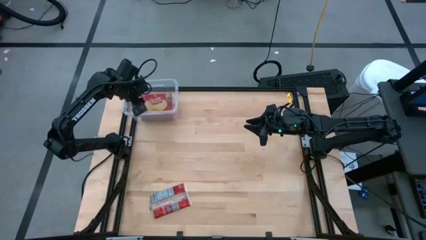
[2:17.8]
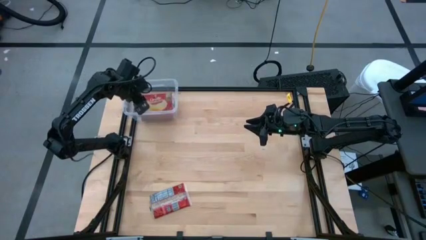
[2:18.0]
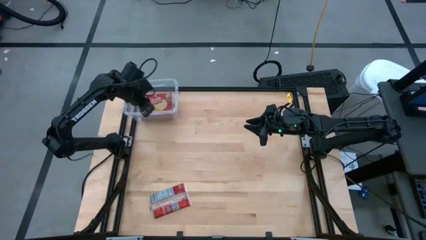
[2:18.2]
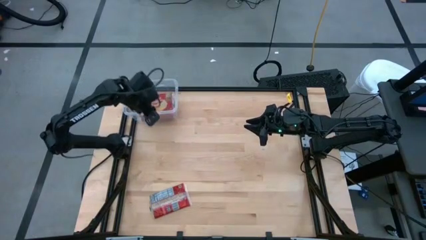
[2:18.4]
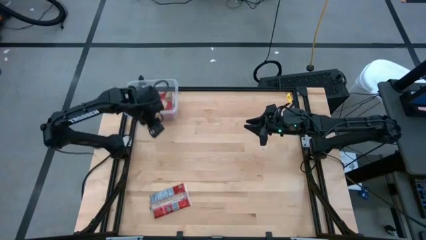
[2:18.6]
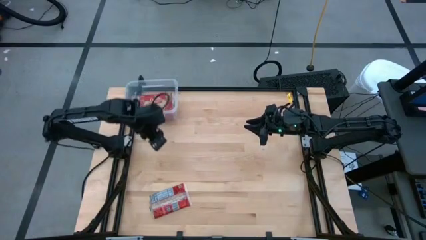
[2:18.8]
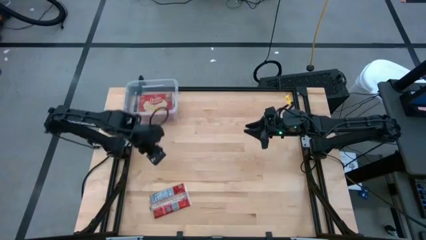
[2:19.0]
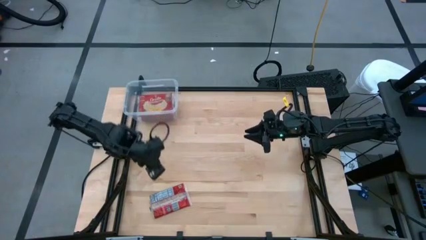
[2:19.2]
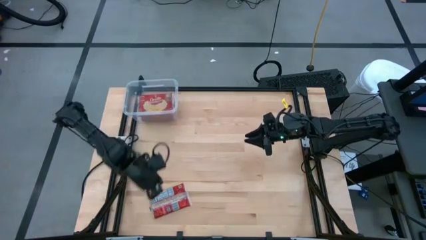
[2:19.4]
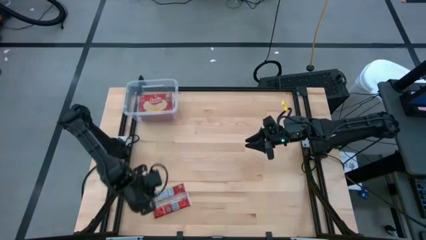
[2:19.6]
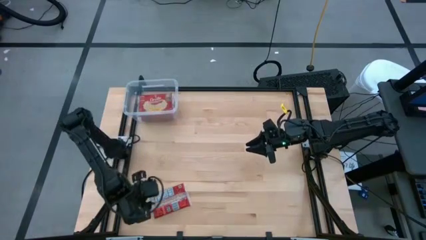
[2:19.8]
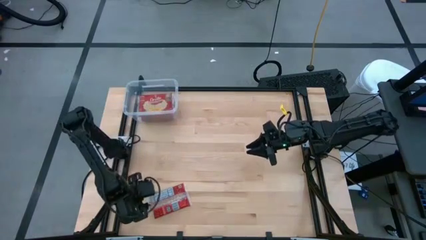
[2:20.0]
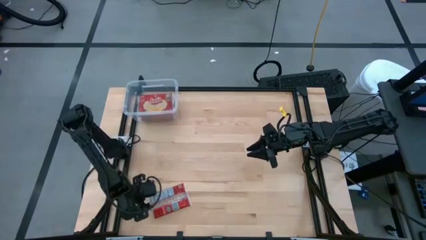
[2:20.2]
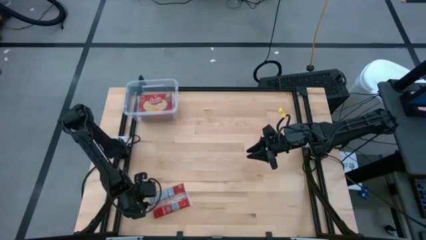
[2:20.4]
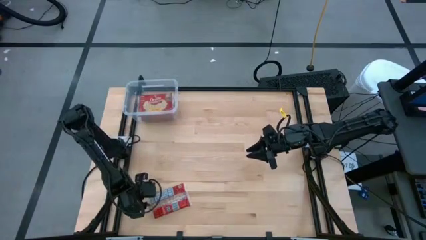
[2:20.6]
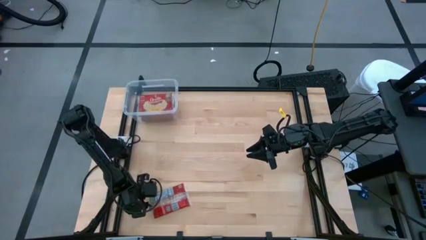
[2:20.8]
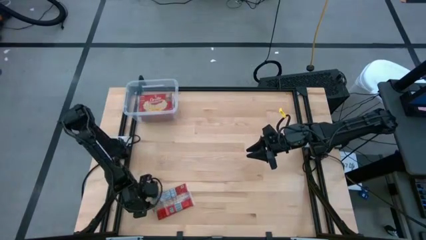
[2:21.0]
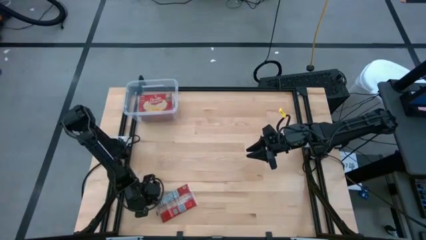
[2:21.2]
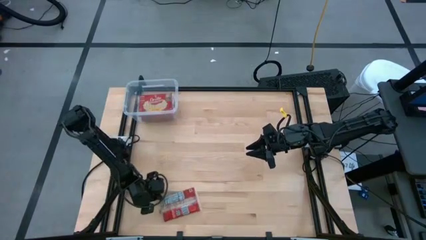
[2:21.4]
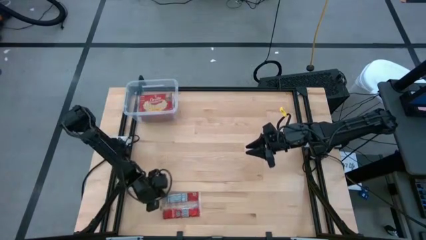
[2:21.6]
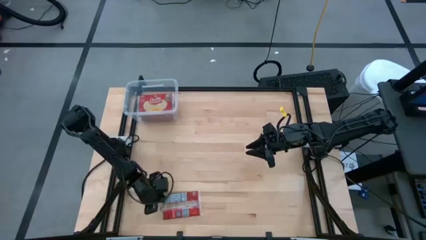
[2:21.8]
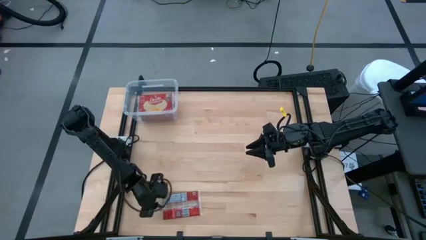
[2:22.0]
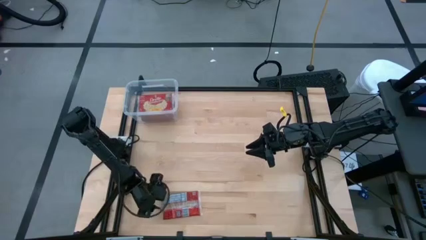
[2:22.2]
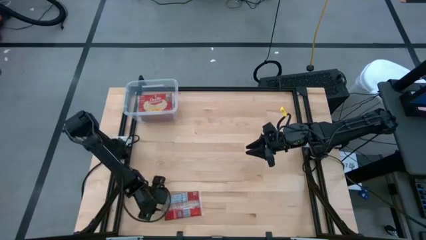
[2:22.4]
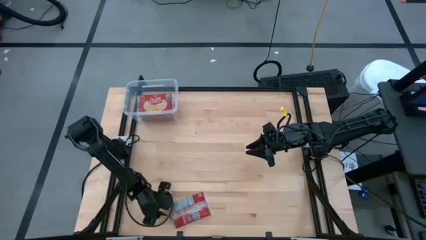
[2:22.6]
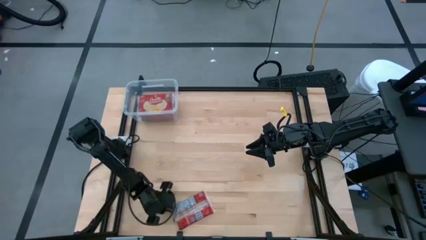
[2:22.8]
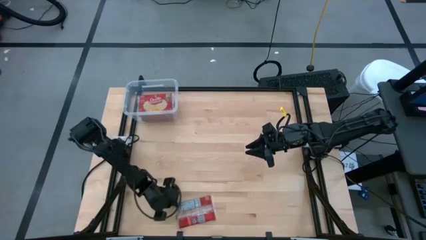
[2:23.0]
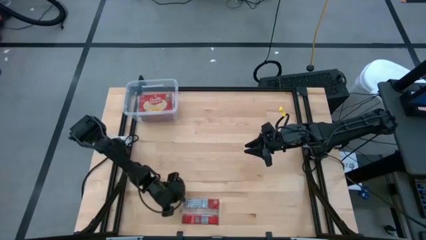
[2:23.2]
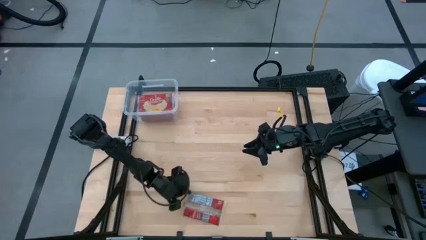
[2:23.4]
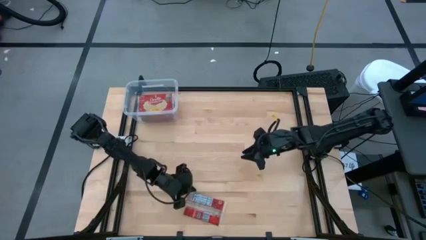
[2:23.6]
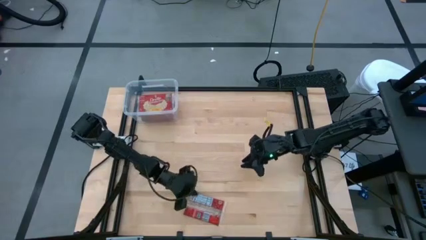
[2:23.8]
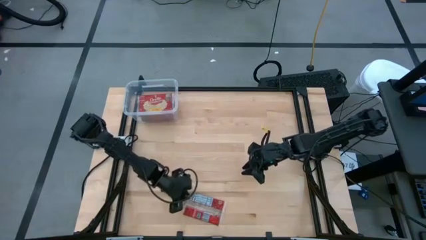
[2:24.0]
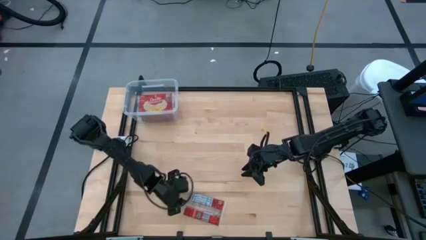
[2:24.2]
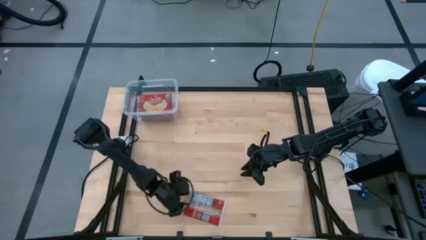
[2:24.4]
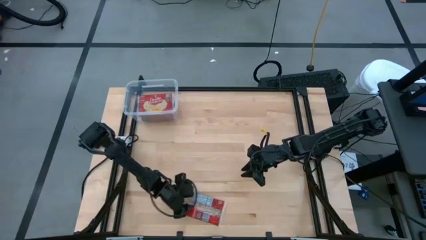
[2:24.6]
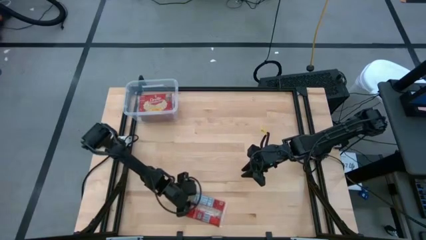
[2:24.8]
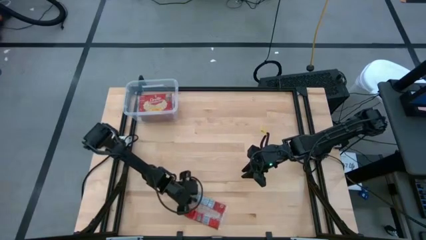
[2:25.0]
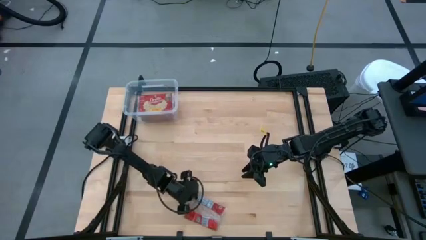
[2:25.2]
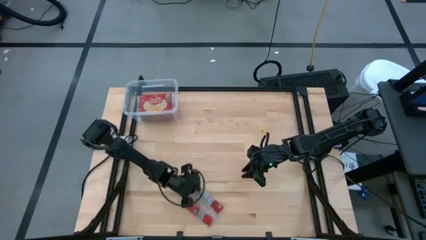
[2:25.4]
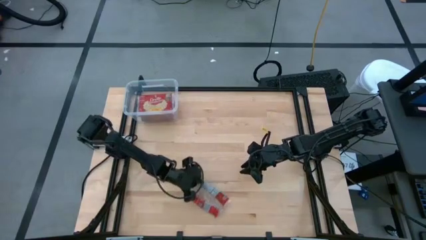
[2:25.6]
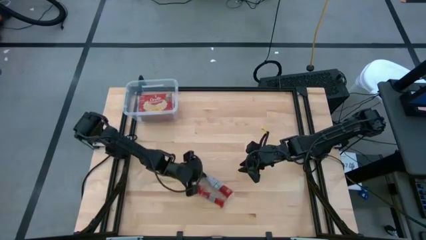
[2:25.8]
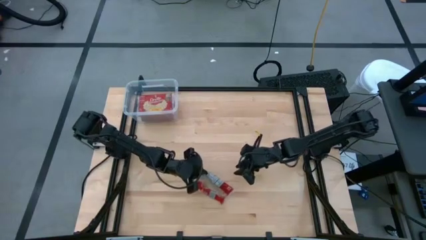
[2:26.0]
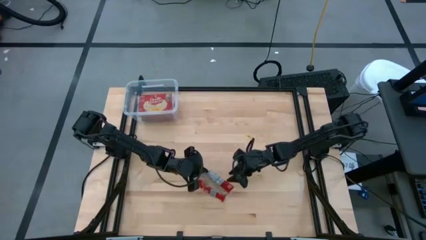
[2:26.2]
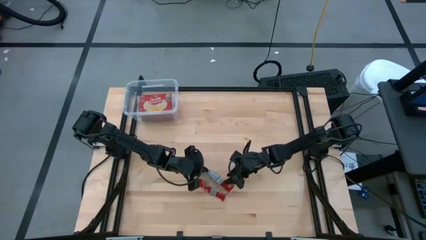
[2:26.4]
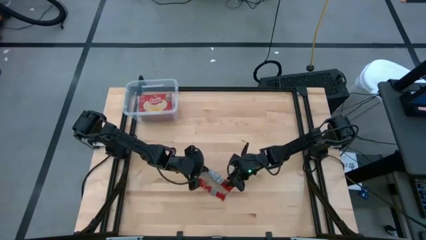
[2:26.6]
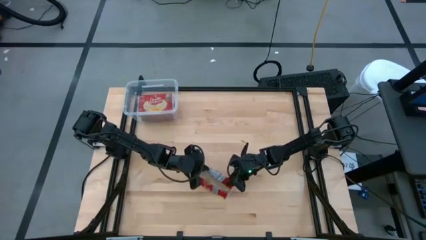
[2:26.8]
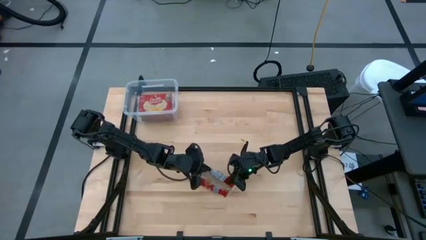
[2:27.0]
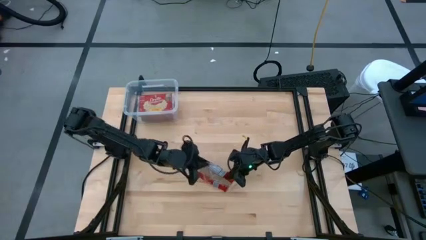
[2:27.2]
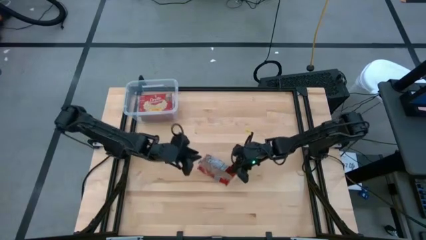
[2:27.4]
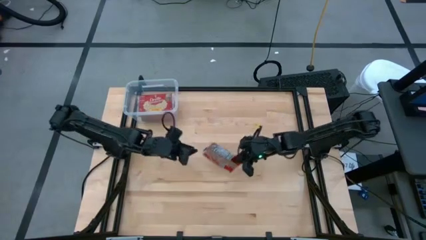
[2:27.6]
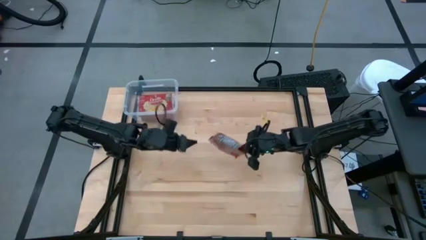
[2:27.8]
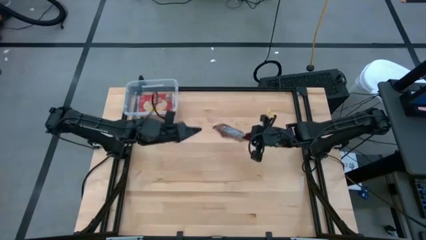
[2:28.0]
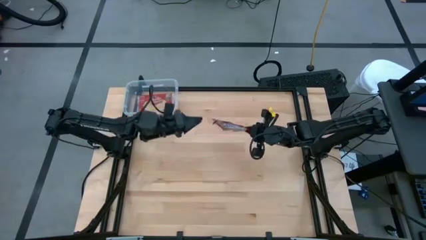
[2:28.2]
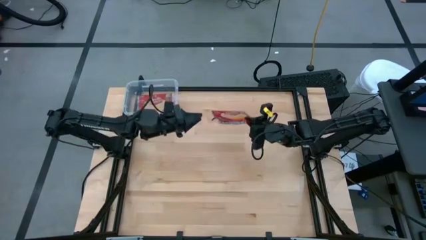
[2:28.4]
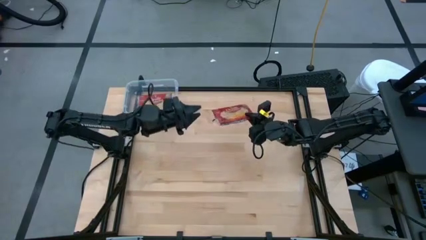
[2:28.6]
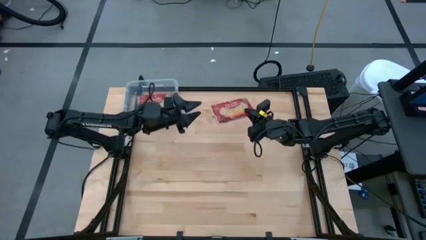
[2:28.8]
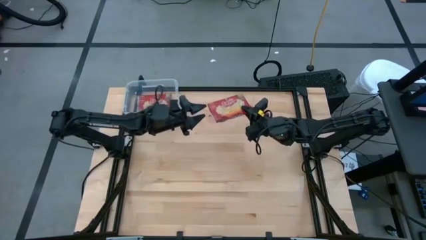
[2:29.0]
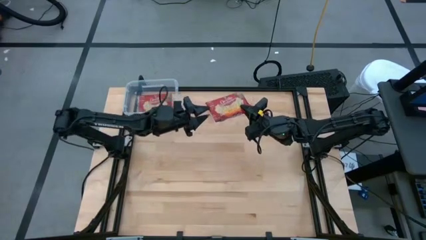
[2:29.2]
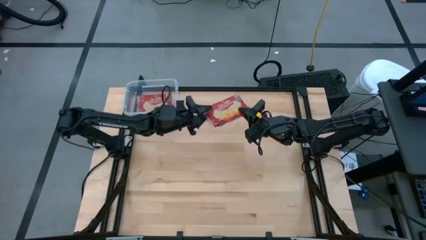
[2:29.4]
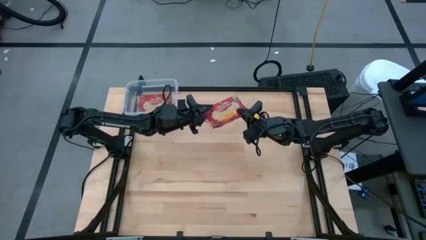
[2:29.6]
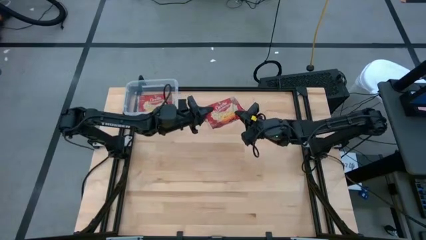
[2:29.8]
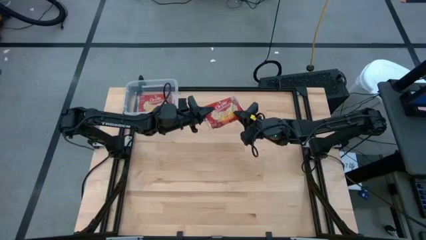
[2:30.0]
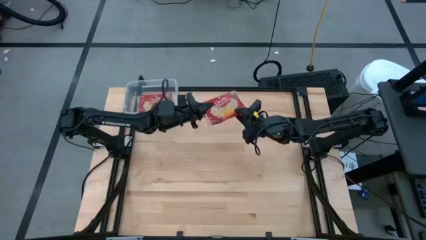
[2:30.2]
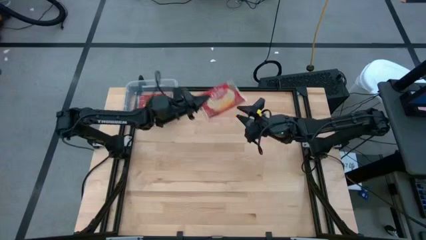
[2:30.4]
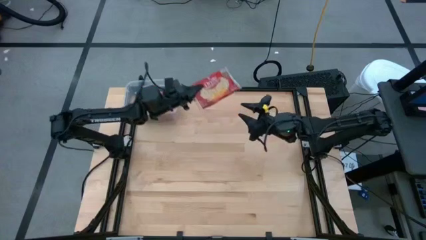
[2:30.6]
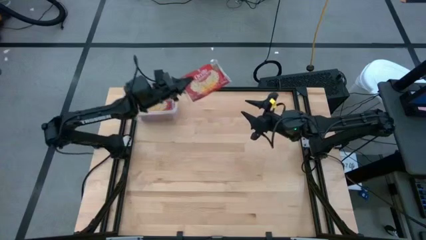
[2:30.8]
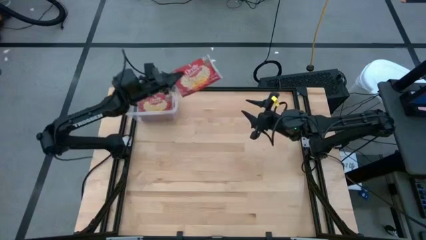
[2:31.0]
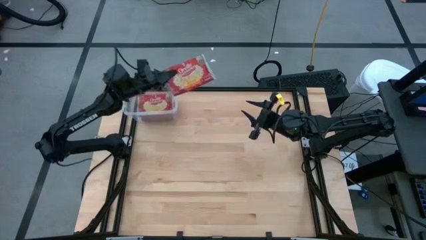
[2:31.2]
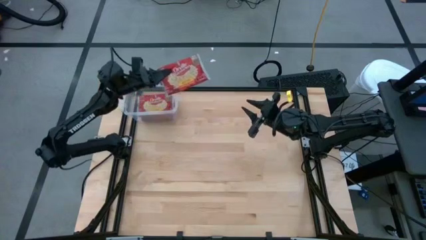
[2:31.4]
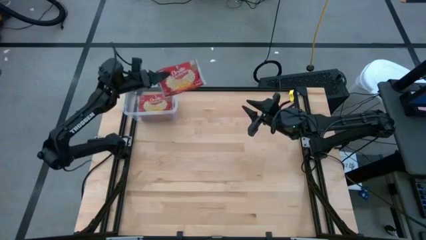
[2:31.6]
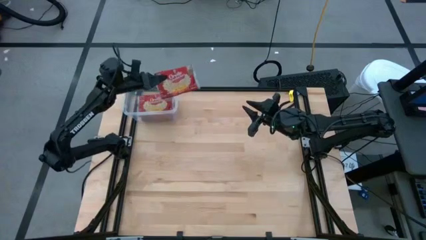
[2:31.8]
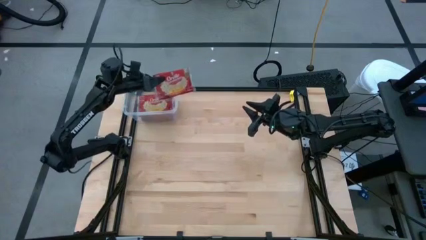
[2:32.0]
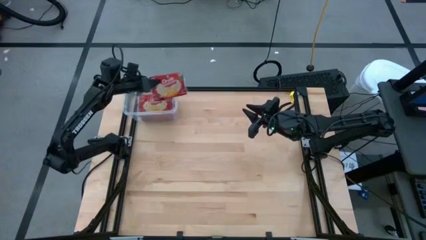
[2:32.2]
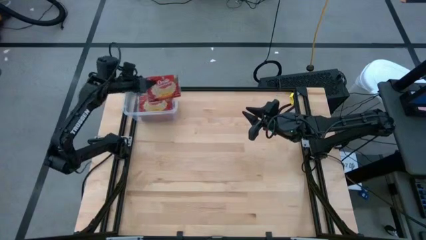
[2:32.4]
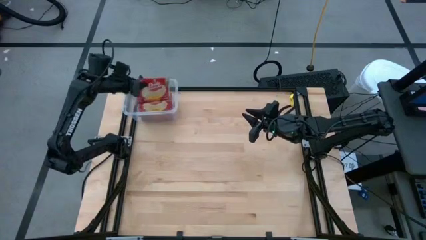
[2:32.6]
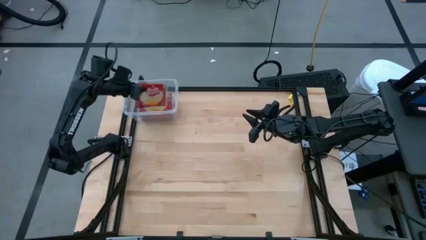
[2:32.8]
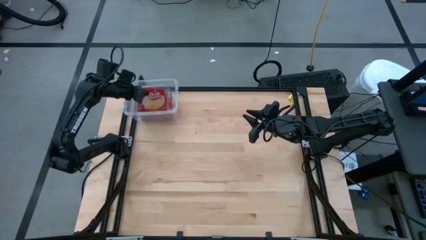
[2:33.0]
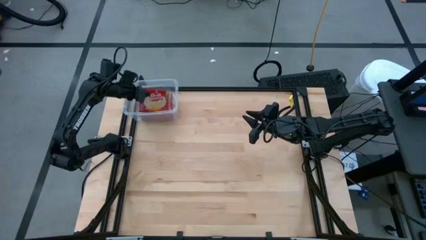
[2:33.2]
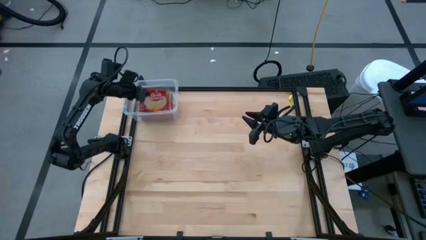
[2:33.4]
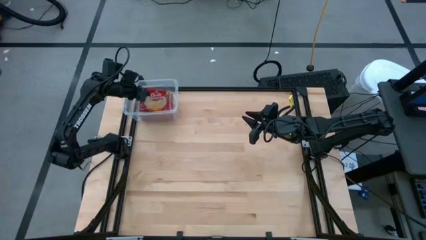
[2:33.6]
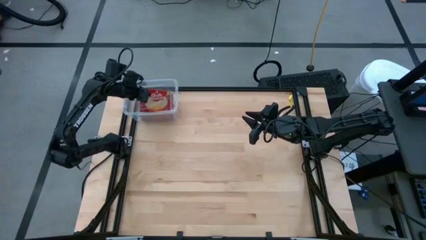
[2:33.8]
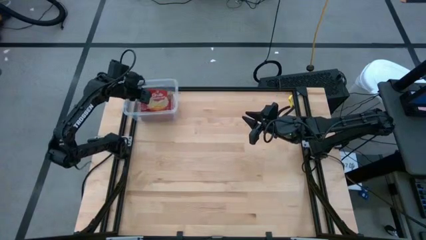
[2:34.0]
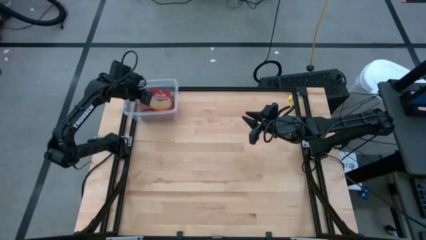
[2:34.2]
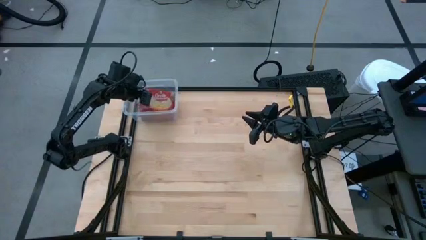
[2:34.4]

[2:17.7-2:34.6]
Task: Sort popcorn bags into baskets
Put the popcorn pack into the transparent bin
